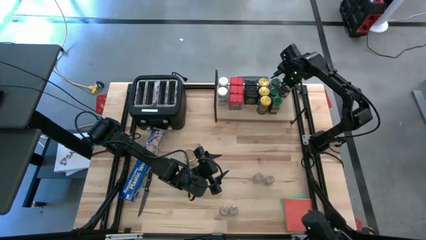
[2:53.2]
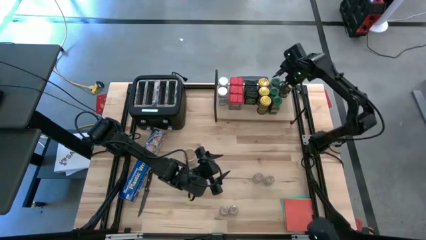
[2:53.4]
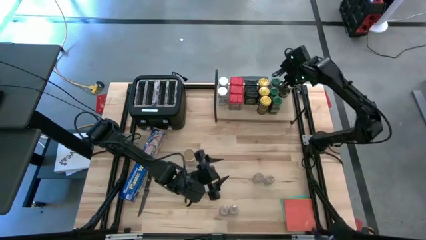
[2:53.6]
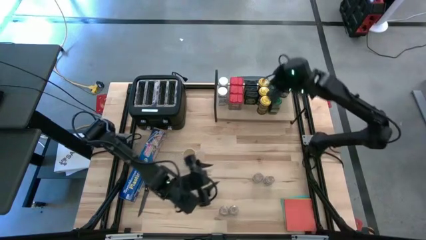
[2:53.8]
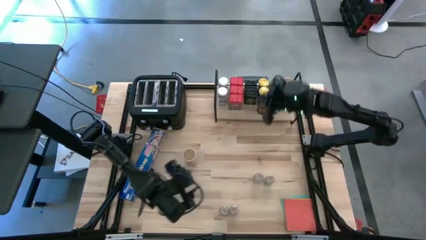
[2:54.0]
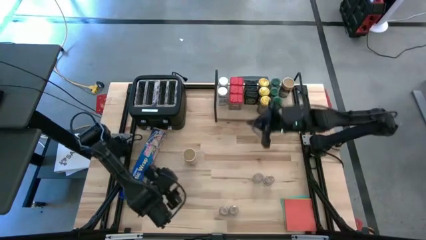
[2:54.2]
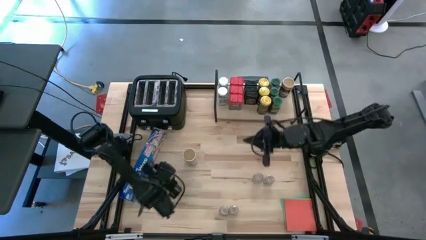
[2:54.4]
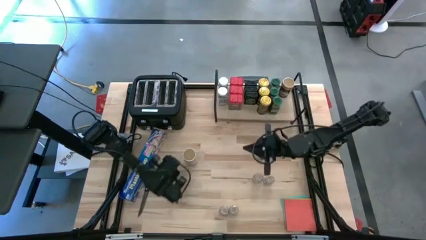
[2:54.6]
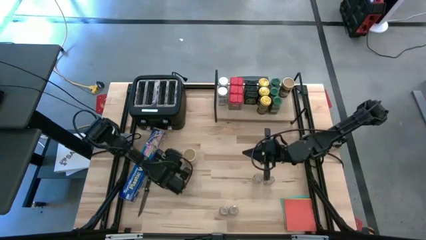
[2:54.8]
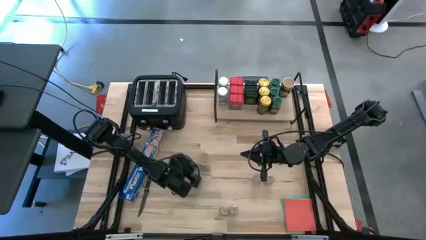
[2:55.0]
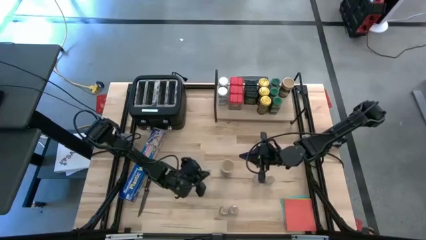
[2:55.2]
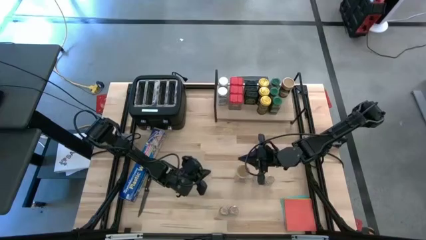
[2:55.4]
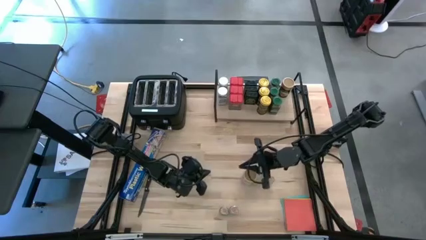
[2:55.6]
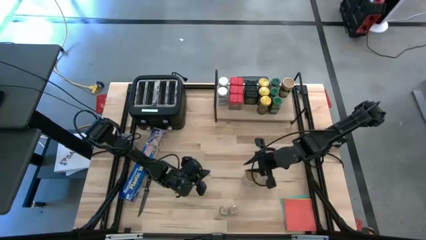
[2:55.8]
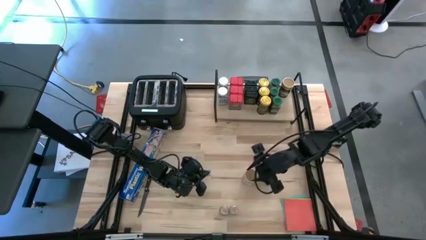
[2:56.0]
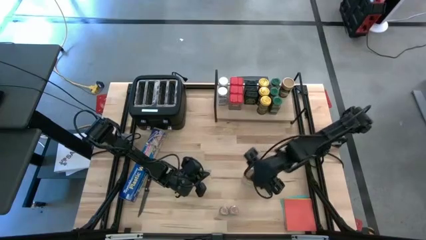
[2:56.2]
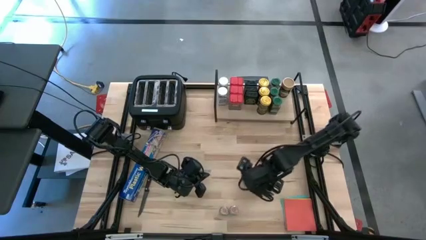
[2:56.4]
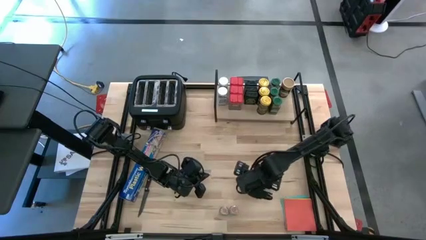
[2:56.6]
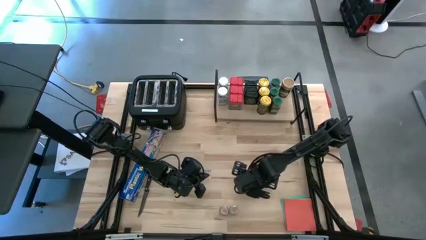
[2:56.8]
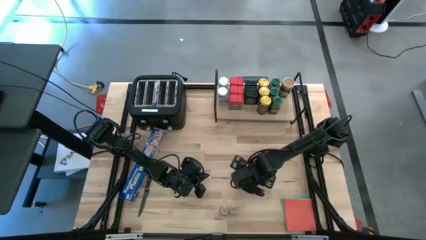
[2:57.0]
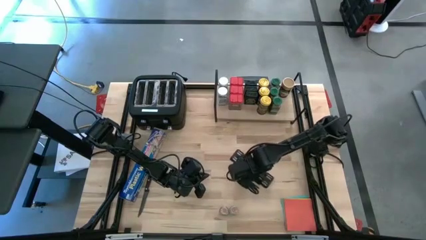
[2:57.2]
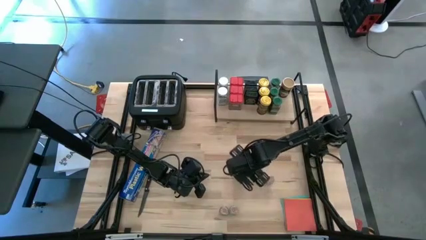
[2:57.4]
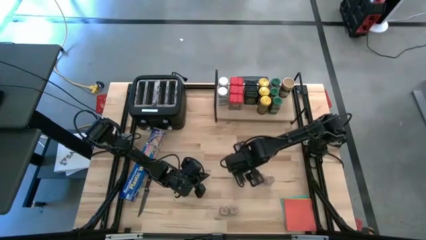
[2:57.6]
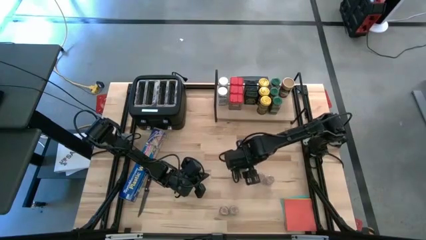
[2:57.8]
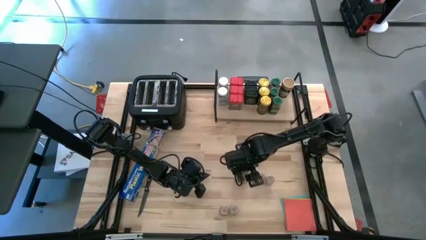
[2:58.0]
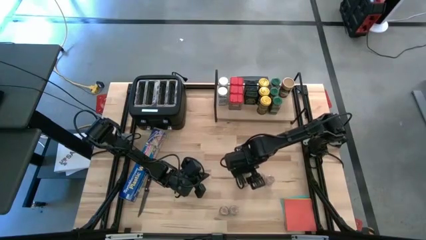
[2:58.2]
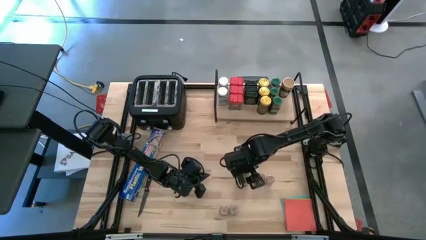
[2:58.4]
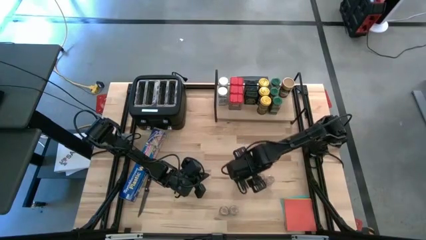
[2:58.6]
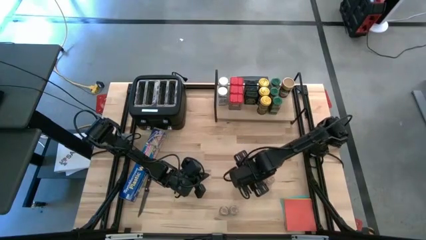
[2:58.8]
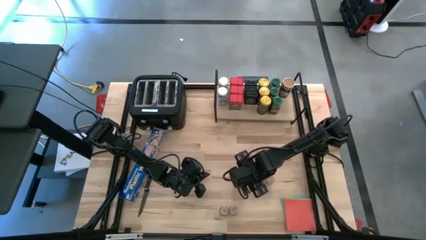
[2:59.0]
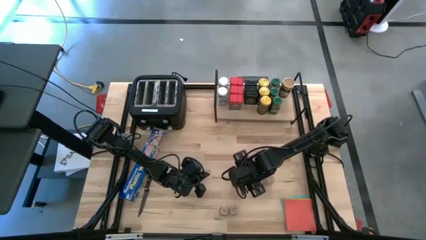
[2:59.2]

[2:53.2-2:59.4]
Task: Shelf spices
Put the brown seasoning bottle on the shelf aligned with the other brown seasoning bottle

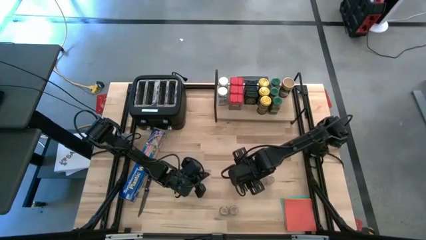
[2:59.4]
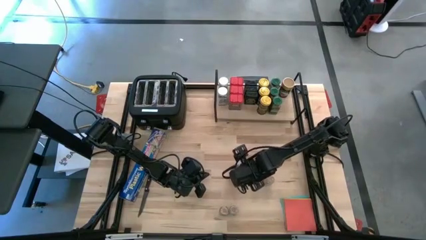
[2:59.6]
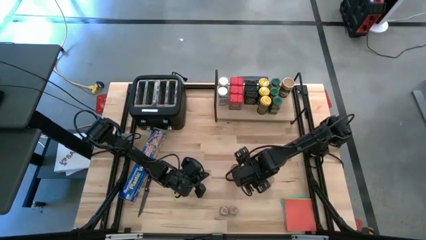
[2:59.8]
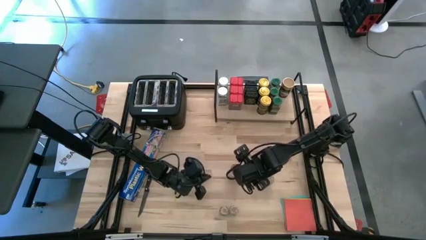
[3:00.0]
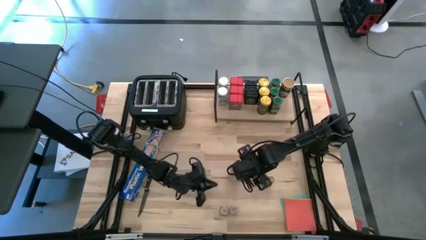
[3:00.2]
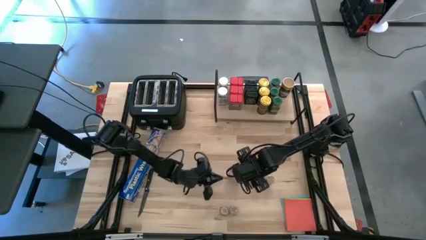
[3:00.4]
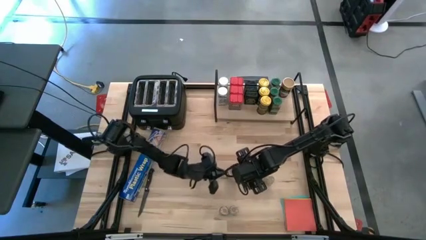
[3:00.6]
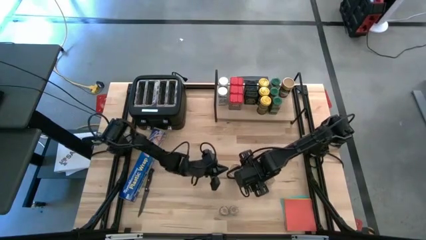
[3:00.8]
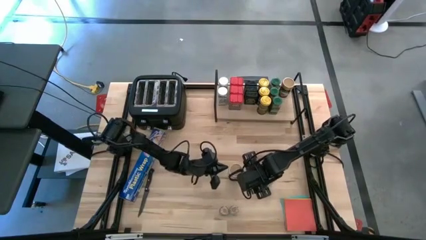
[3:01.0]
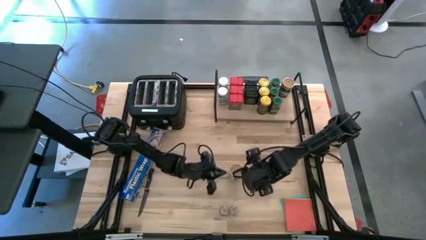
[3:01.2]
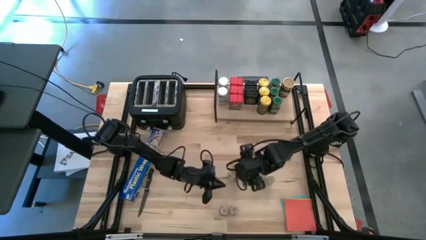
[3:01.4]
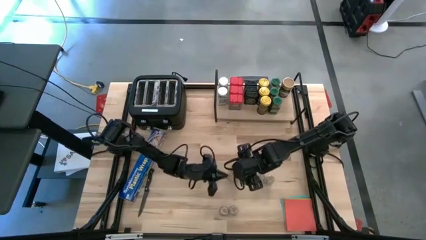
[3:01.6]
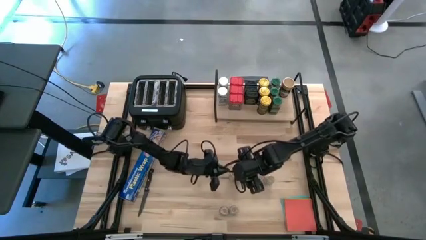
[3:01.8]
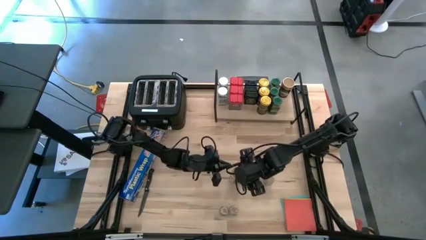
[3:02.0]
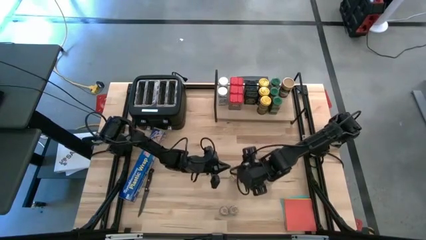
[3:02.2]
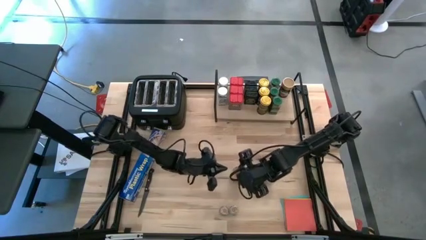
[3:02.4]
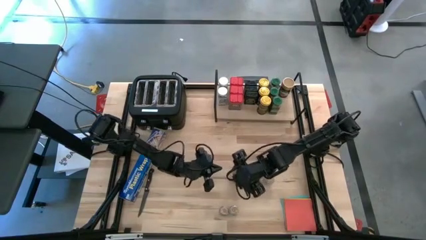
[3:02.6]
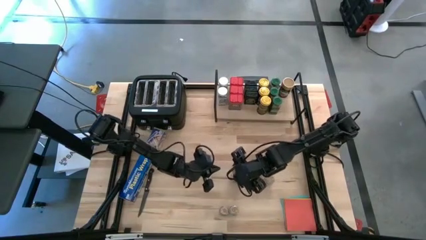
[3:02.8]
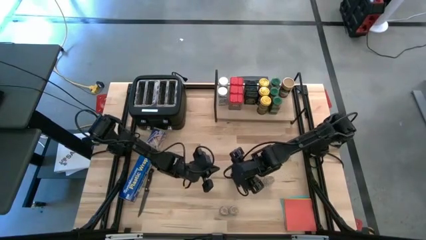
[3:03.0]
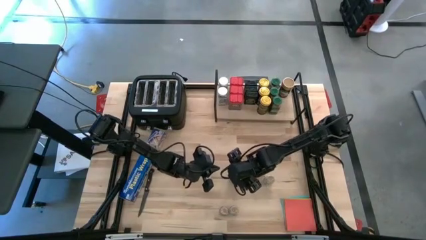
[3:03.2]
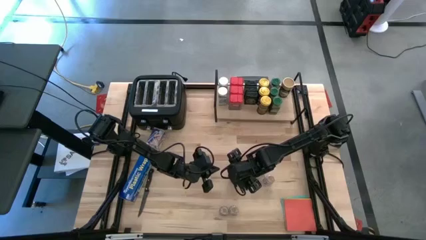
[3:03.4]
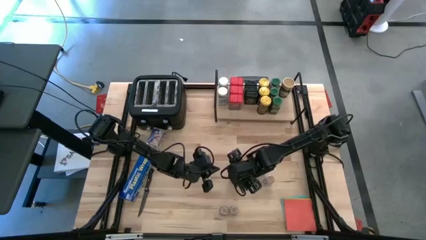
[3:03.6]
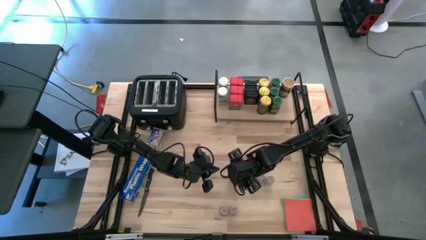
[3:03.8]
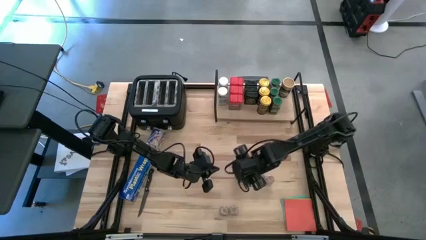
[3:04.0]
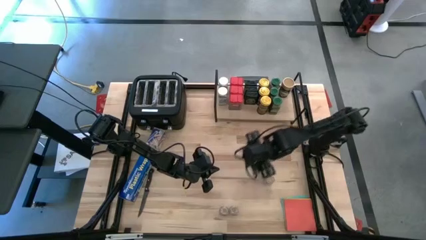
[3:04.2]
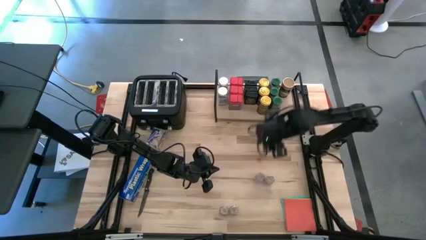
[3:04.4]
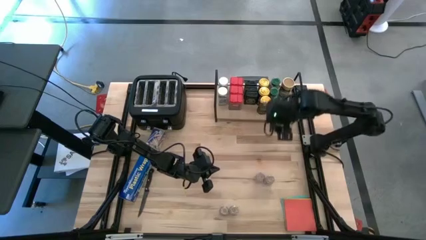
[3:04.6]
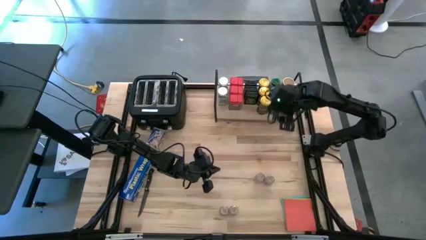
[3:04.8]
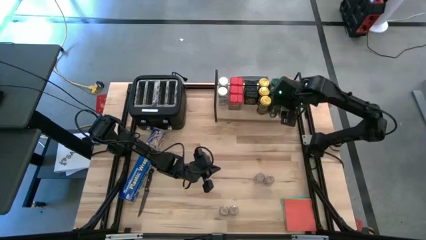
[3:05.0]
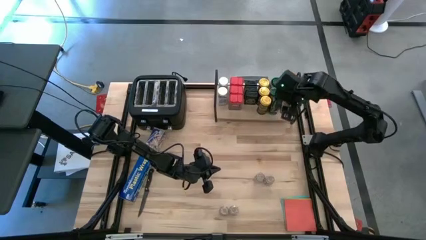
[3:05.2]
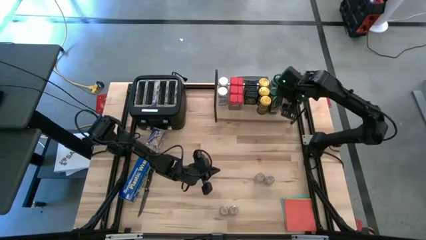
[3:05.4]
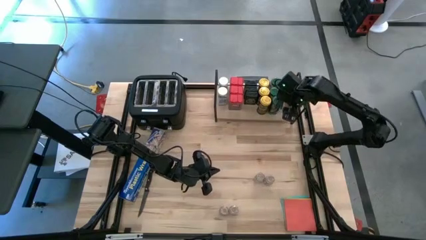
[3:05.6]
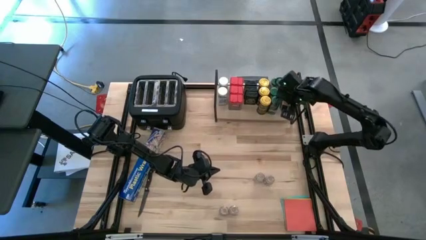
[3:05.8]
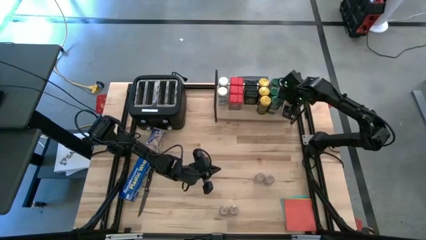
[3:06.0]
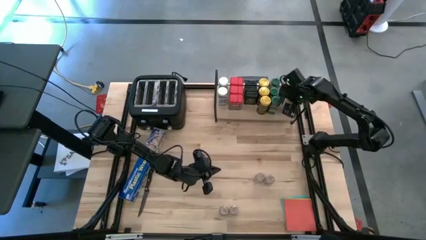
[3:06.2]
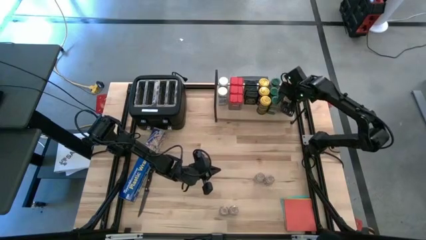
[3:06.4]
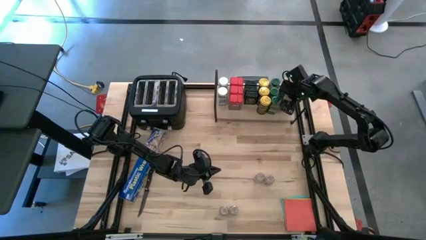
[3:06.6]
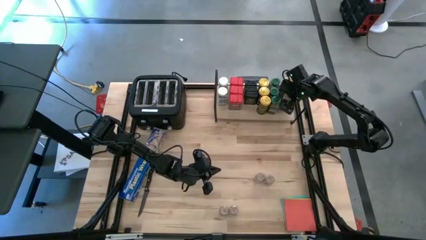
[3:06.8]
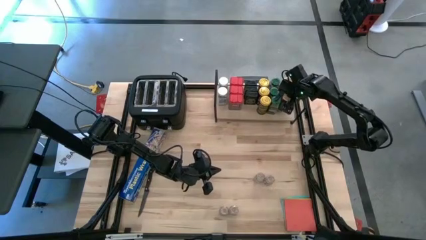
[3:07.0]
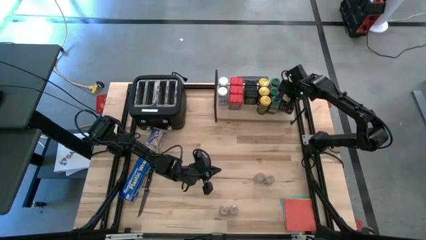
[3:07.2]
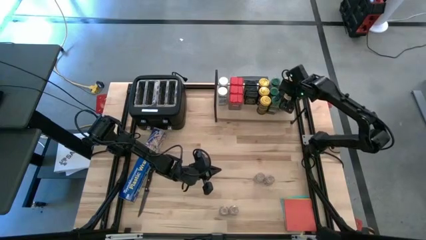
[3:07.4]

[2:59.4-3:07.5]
Put the brown seasoning bottle on the shelf aligned with the other brown seasoning bottle
